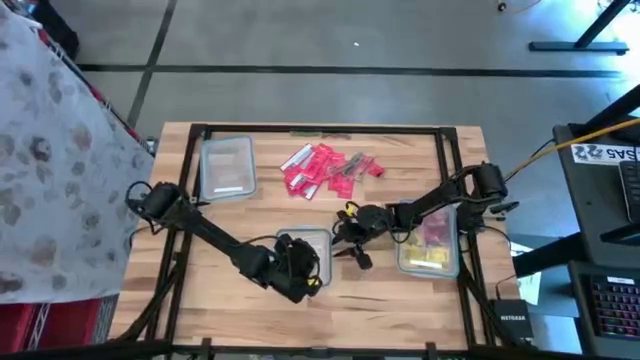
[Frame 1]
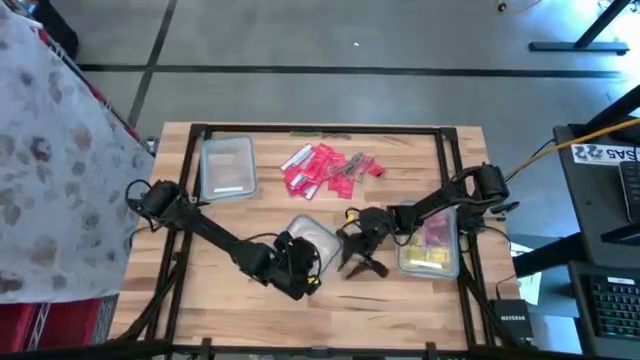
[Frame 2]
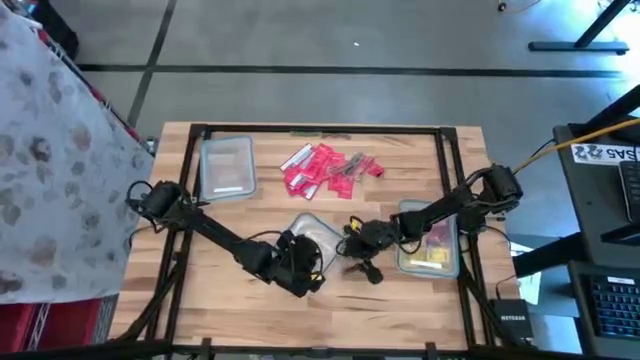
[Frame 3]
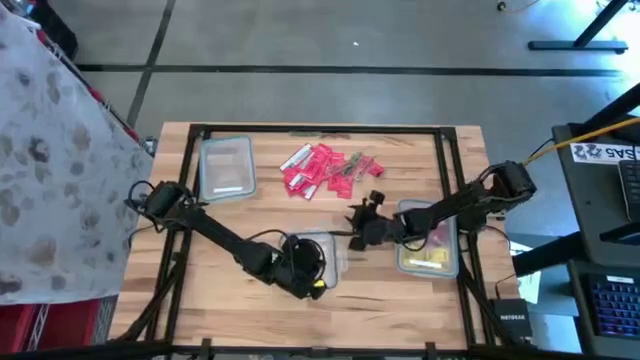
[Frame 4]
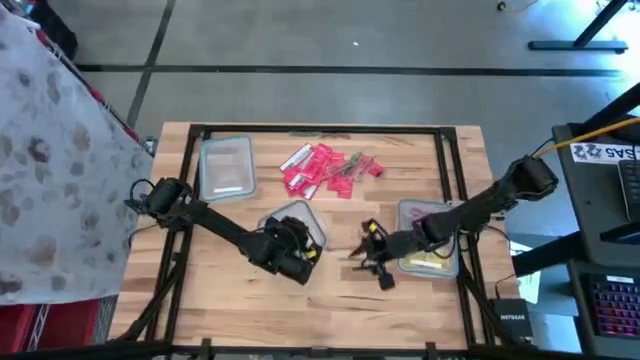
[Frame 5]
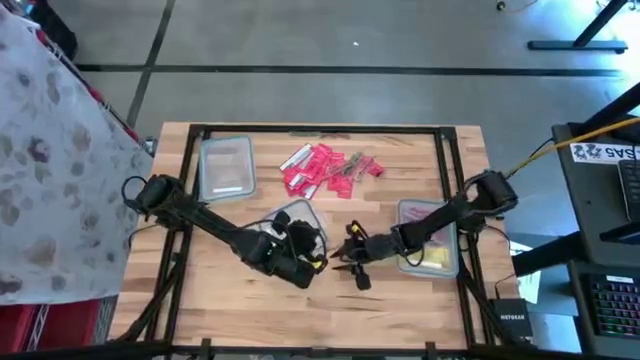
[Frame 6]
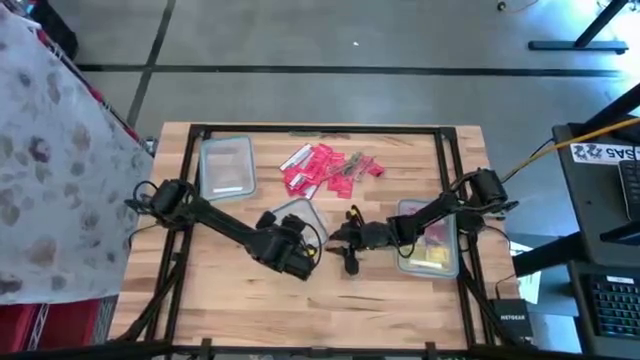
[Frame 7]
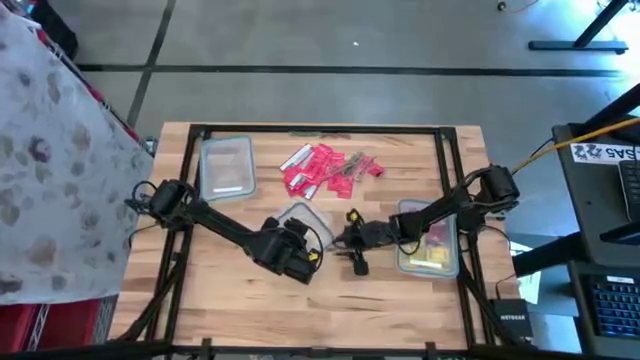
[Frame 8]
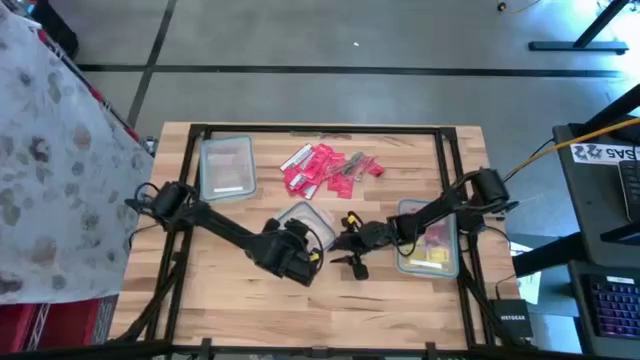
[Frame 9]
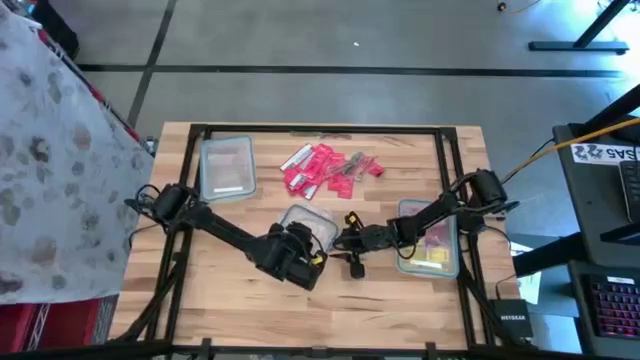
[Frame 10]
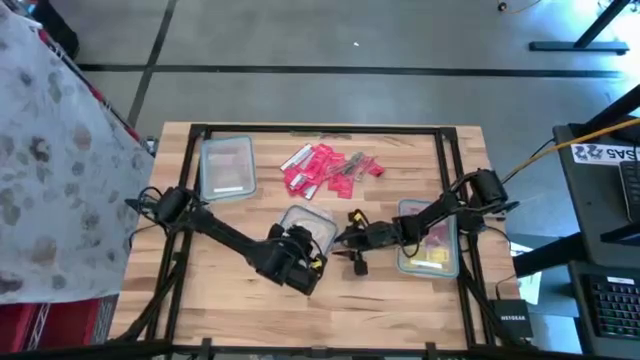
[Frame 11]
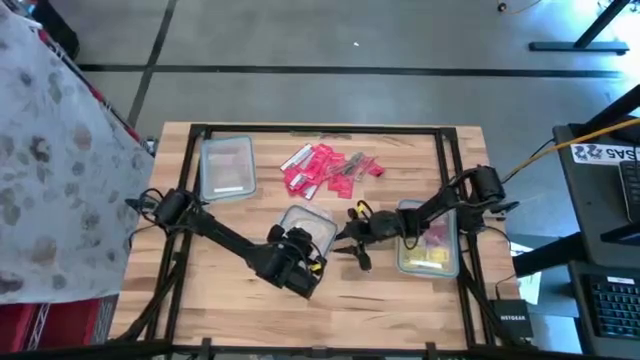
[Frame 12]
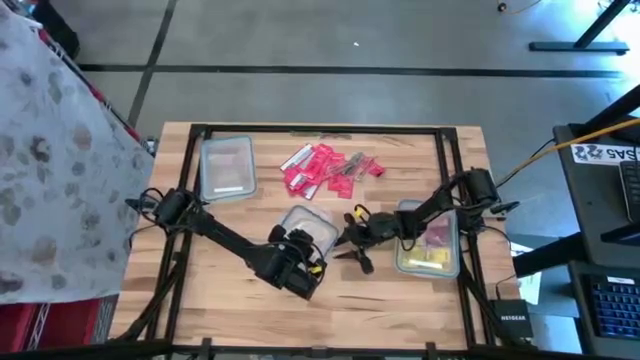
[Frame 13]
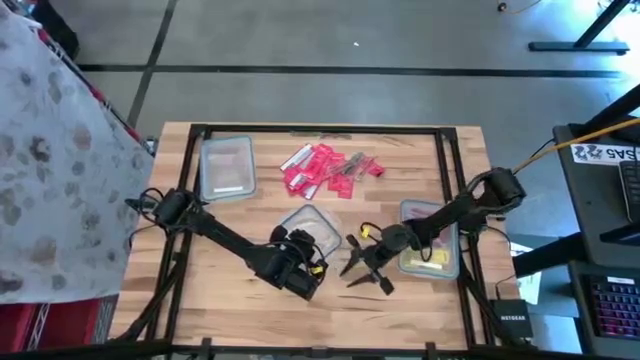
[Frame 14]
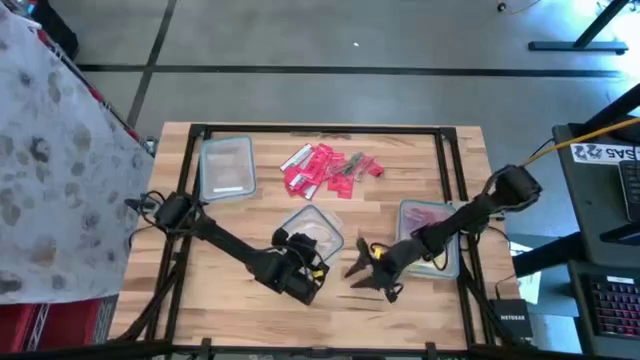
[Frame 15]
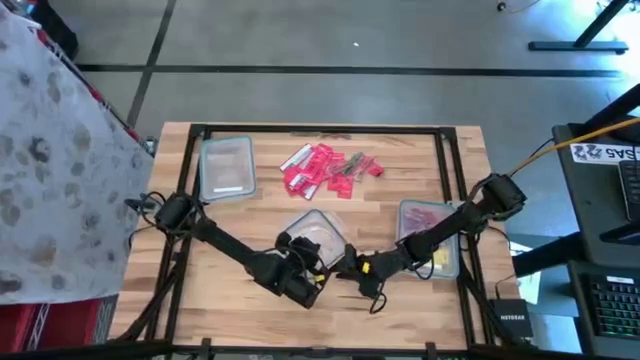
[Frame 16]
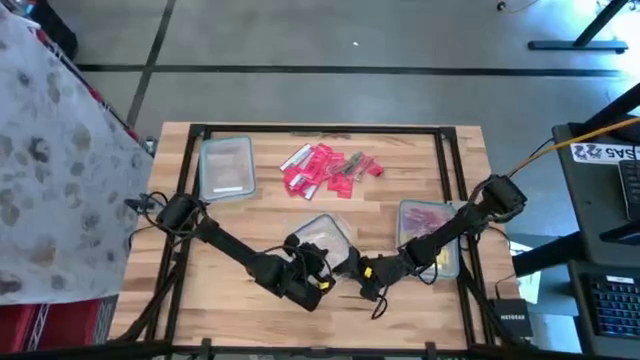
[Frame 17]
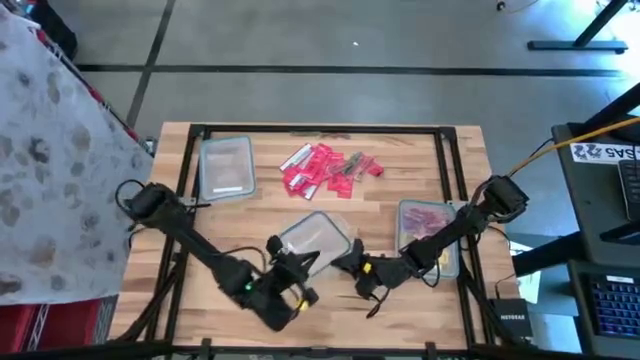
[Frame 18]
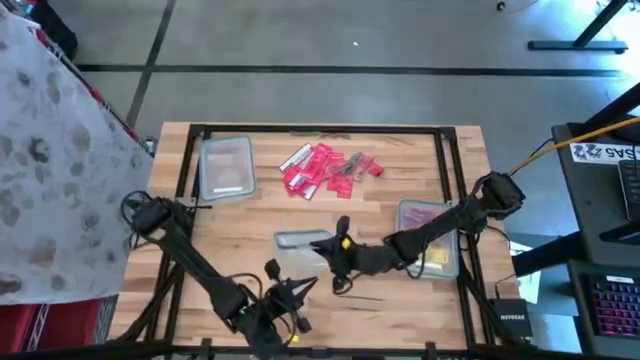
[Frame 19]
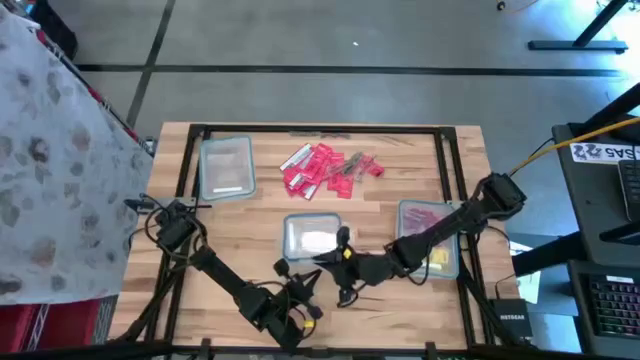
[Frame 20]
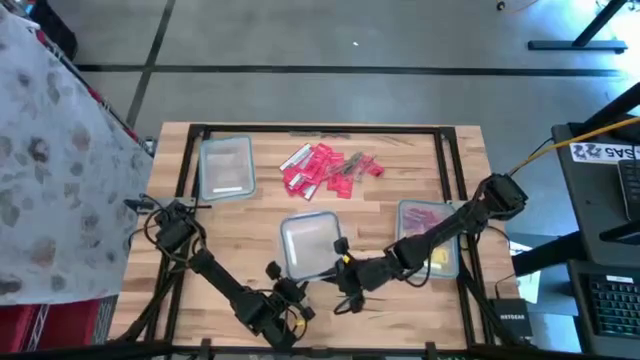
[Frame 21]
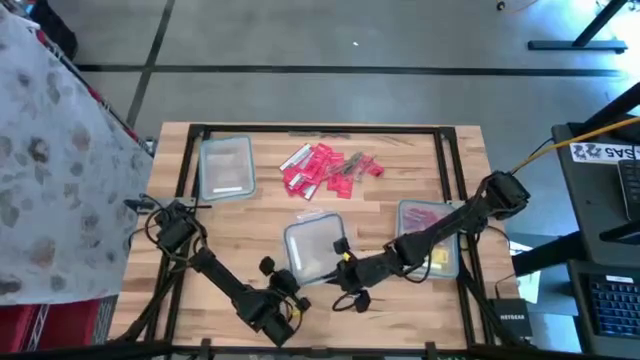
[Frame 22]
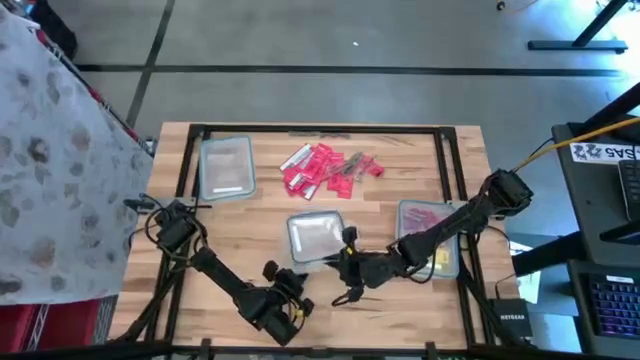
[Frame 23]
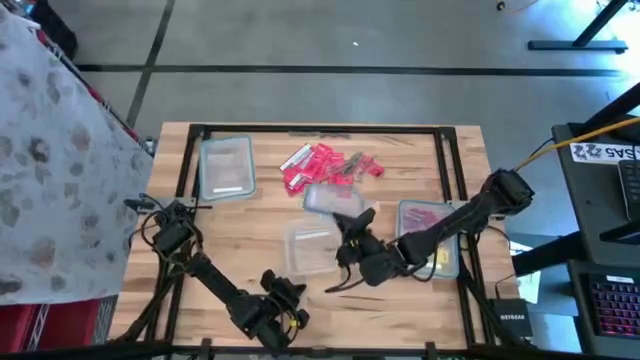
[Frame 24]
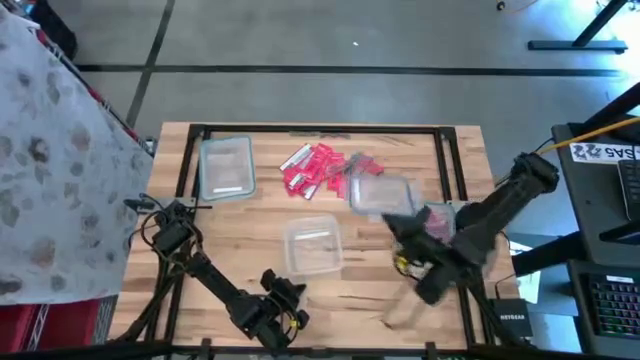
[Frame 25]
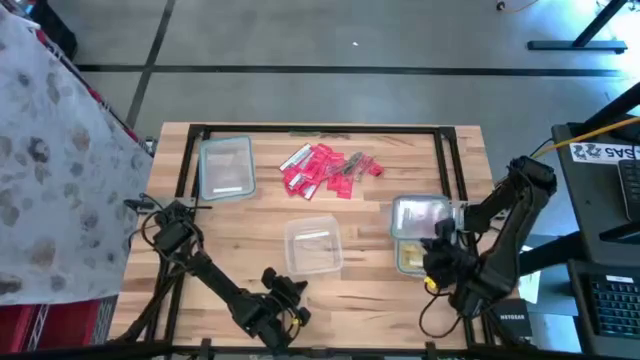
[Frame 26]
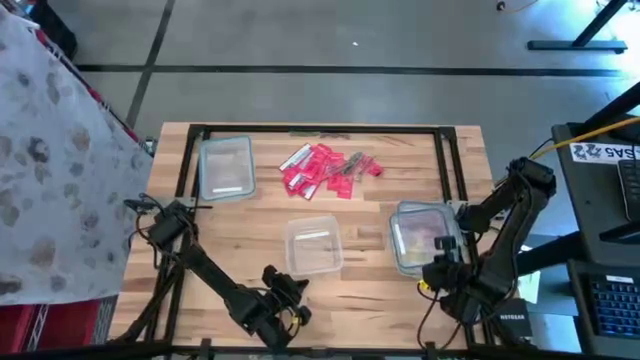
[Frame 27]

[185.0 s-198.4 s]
Task: Sort candy
Open the square transparent bin

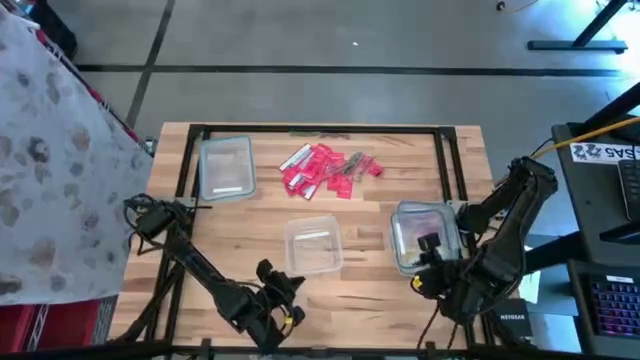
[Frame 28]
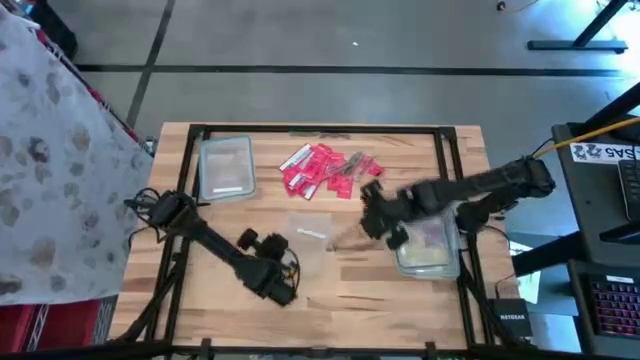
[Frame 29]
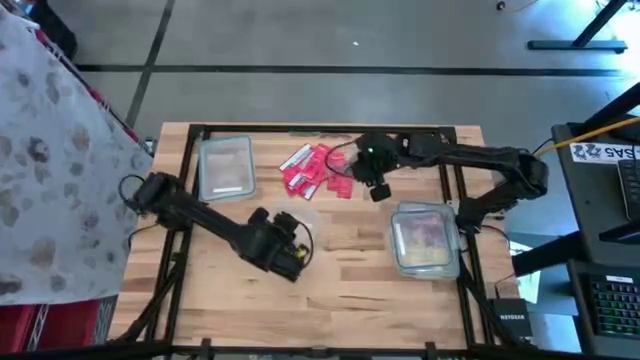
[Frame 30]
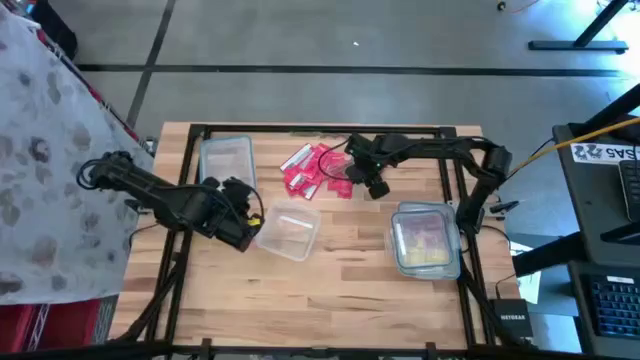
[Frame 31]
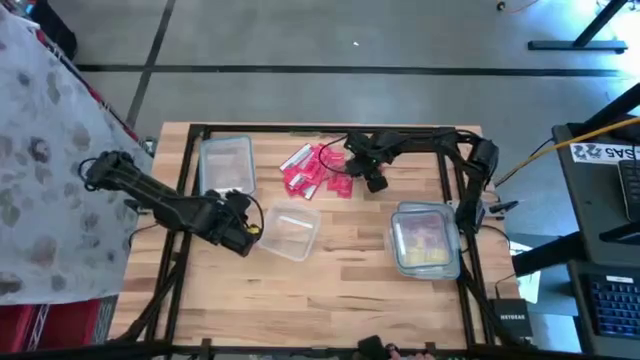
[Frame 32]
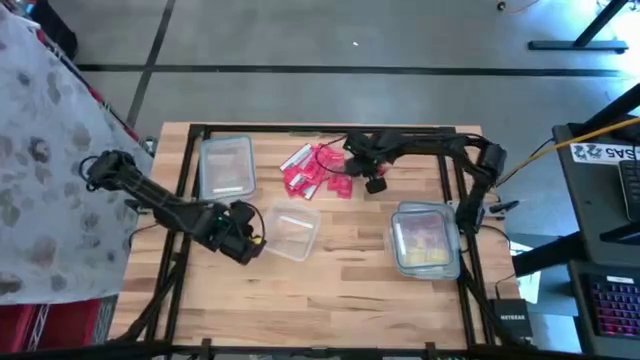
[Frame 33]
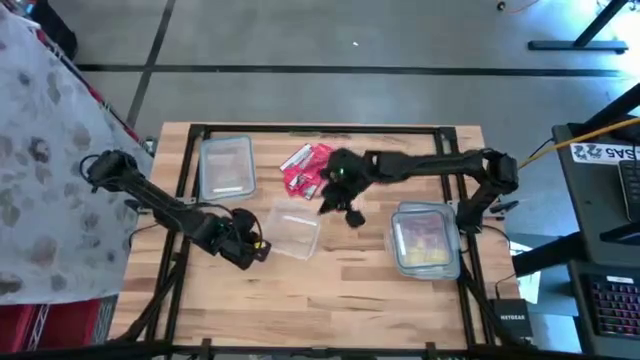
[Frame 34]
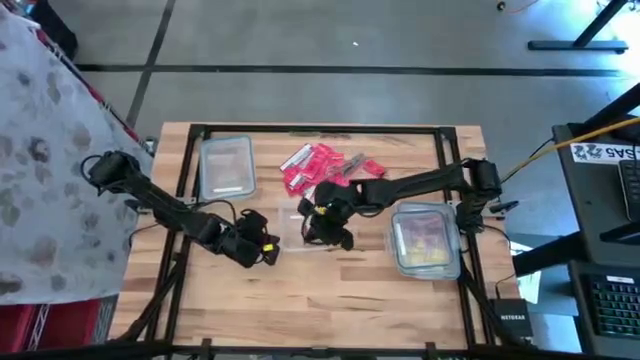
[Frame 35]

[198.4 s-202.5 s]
Put the red candy stick into the square transparent bin

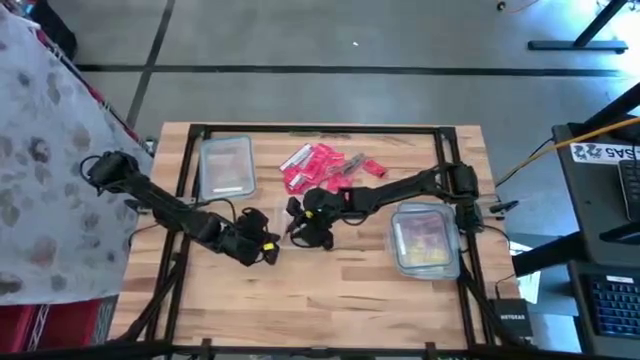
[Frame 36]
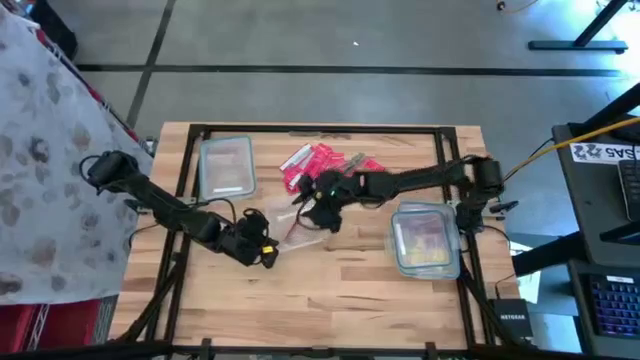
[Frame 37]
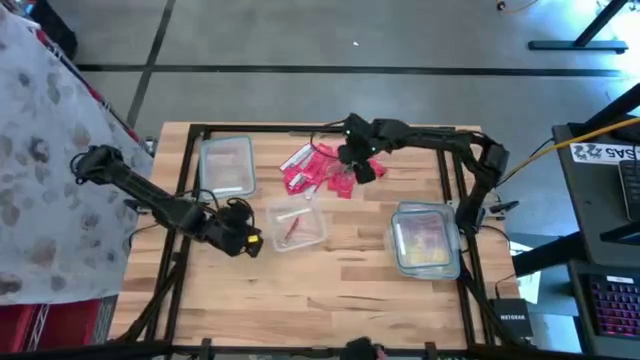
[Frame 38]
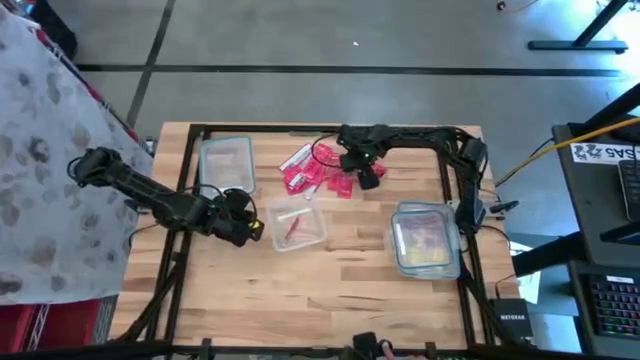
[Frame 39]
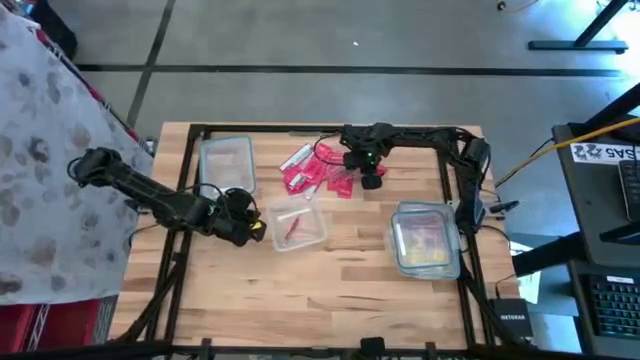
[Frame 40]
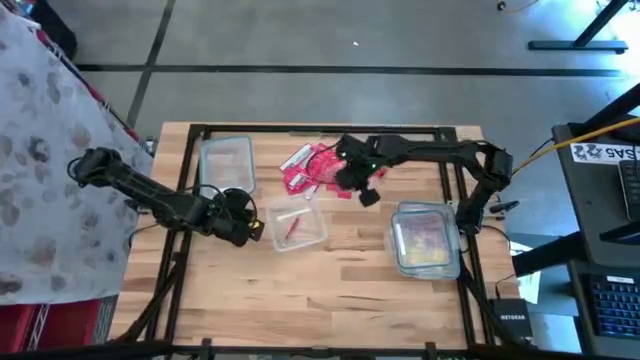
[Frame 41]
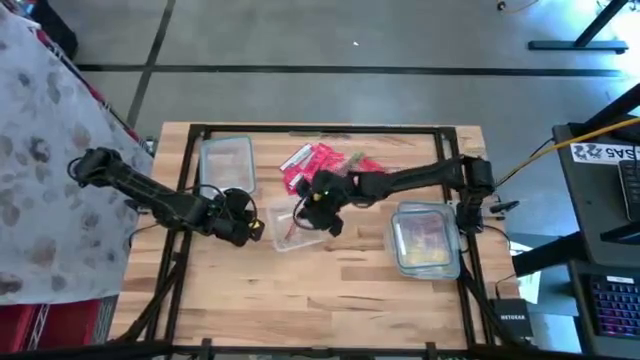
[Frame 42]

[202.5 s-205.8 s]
Put the red candy stick into the square transparent bin

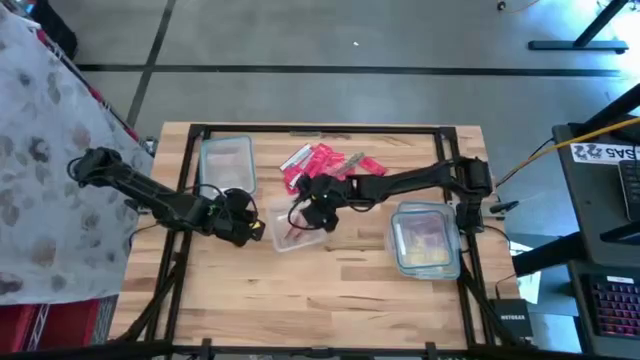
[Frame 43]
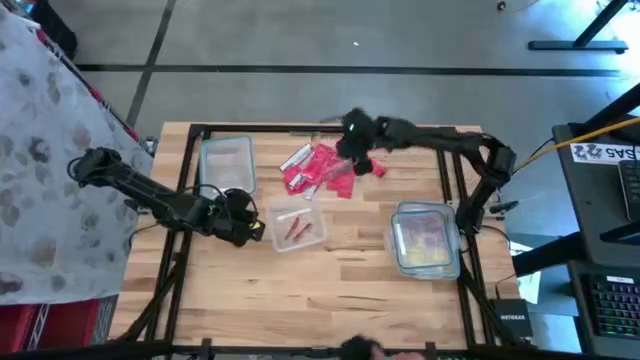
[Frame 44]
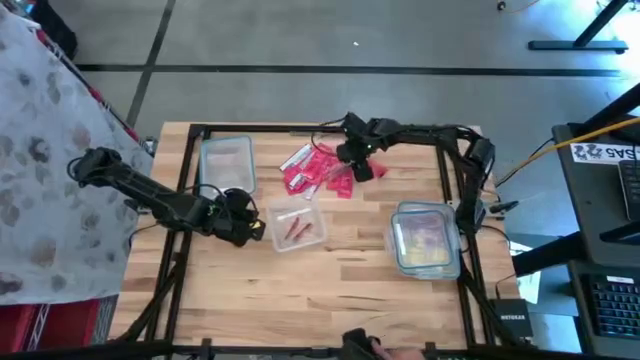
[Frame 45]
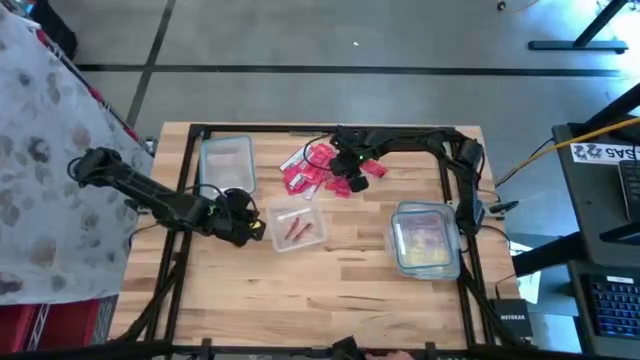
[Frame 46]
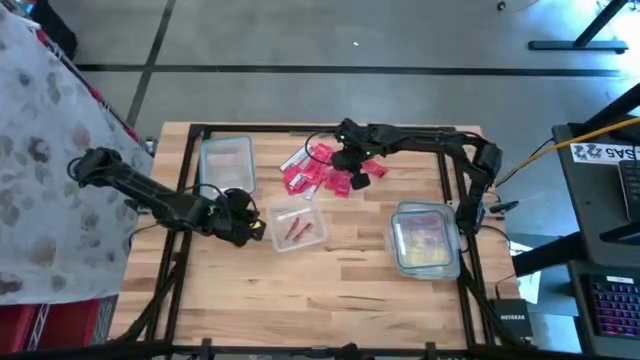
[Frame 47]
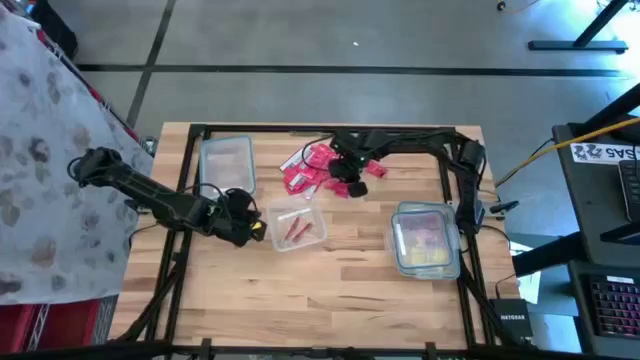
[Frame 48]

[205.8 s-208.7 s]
Put the red candy stick into the square transparent bin
